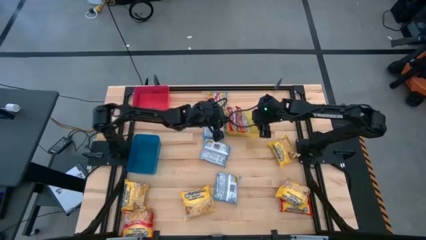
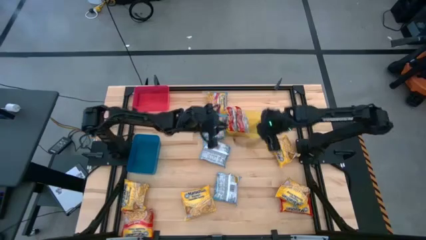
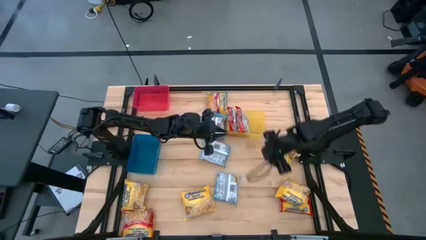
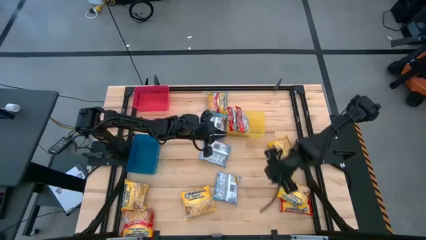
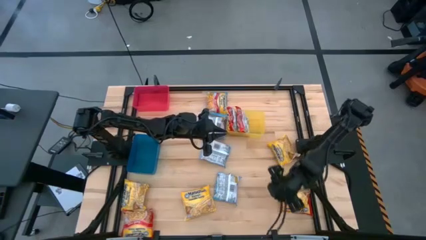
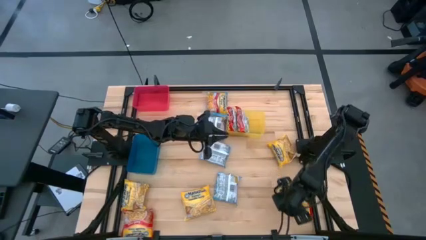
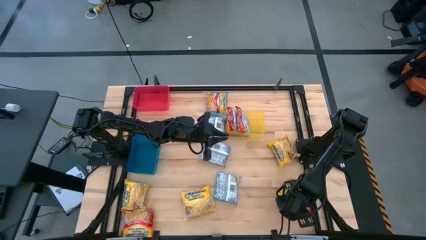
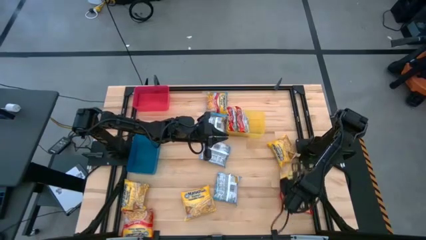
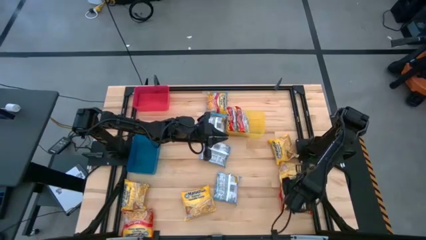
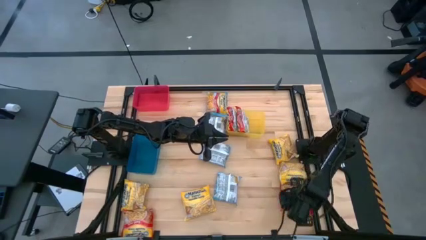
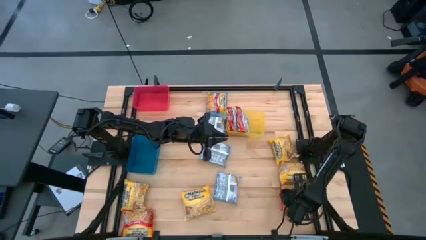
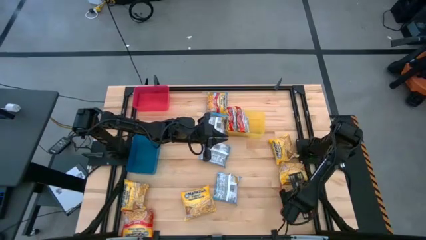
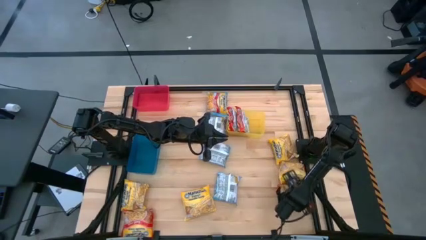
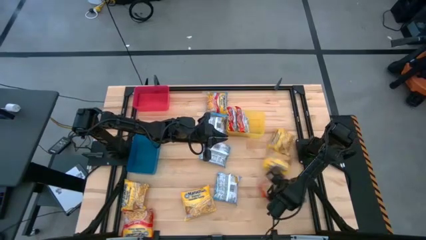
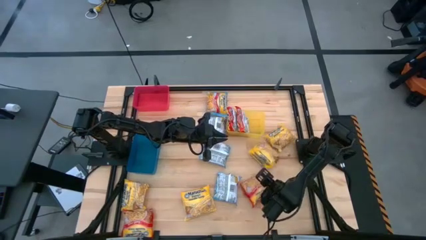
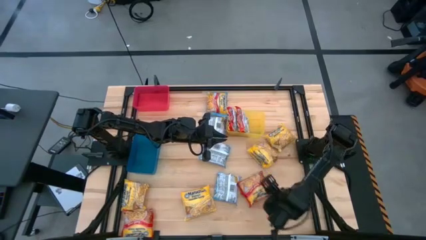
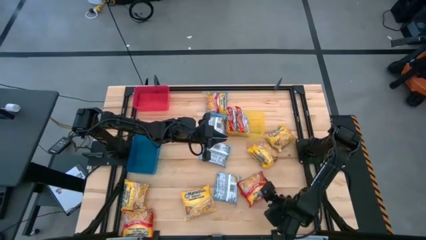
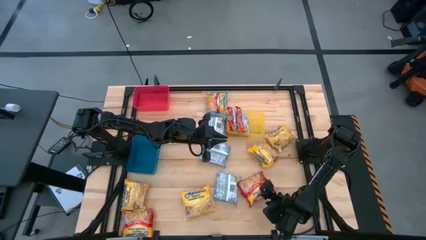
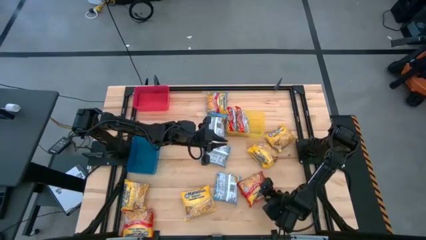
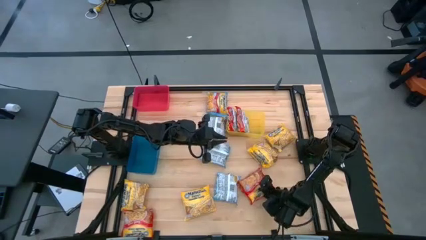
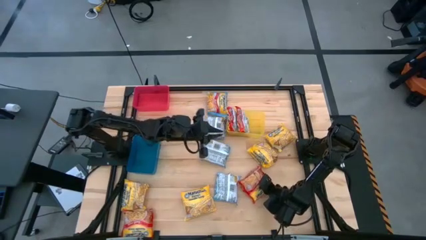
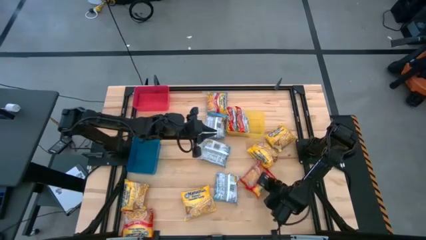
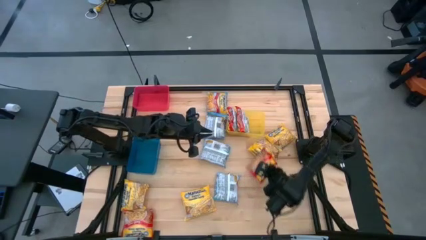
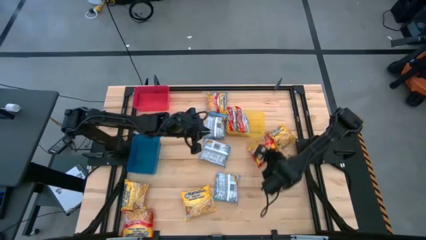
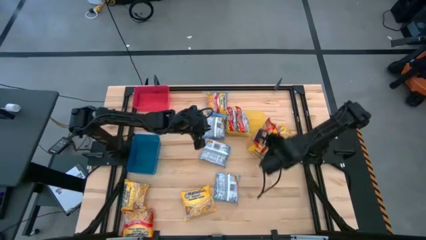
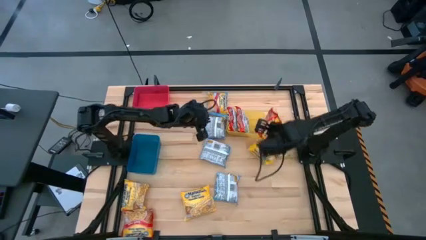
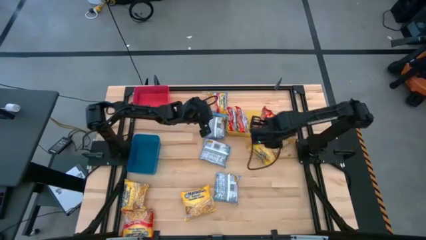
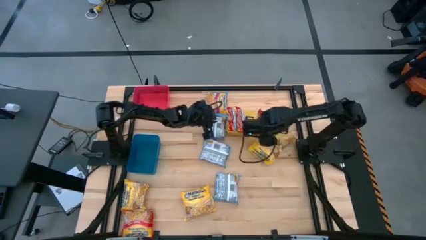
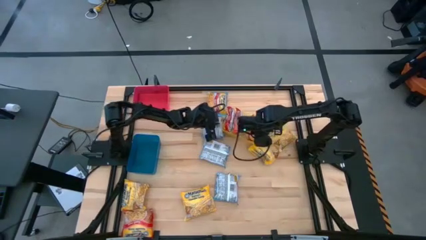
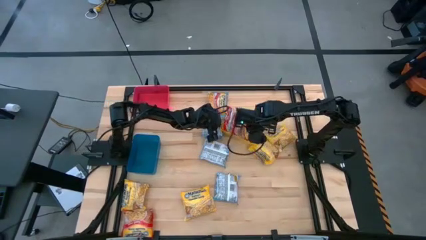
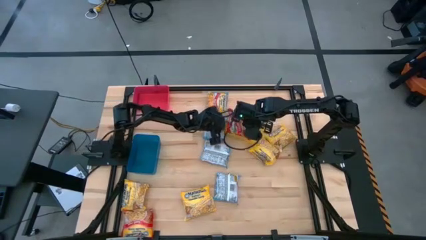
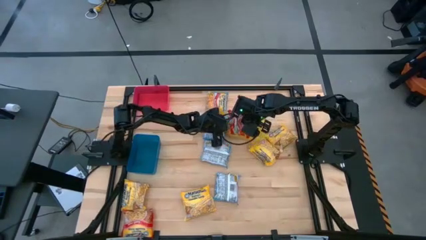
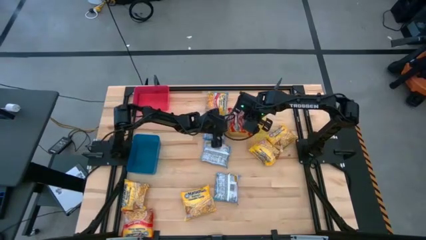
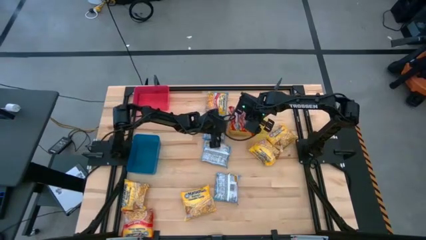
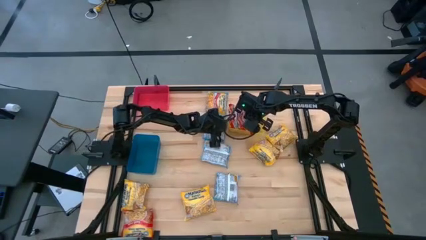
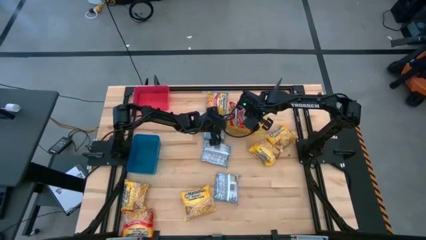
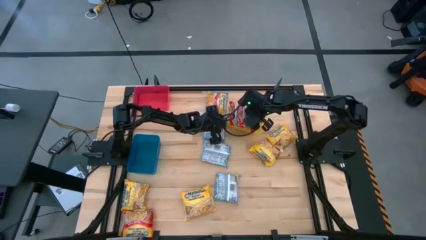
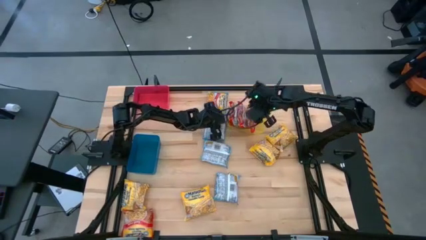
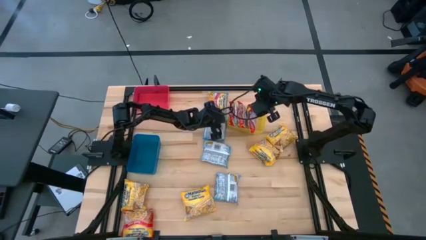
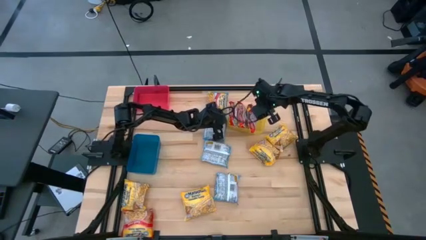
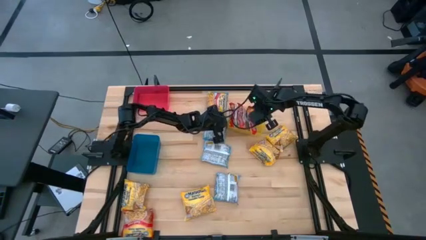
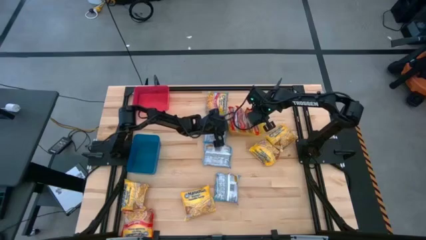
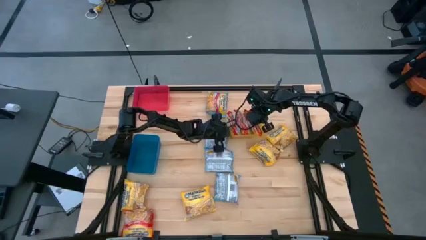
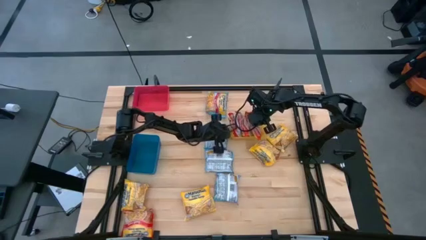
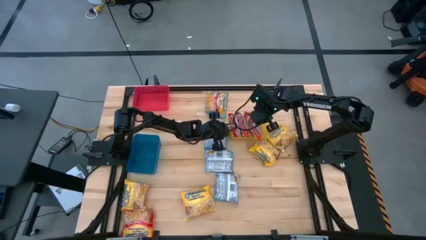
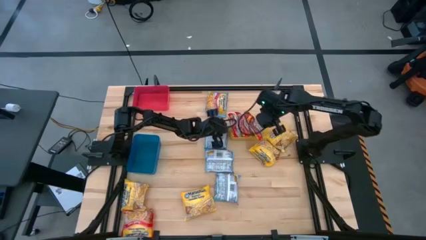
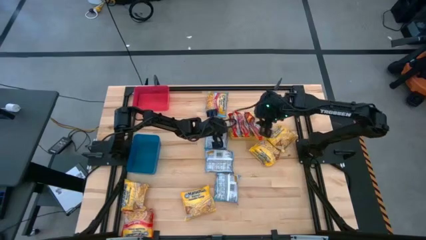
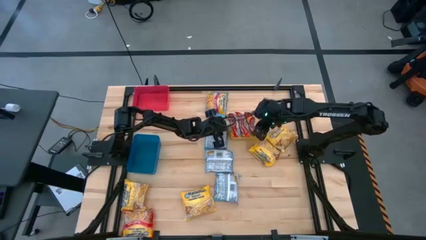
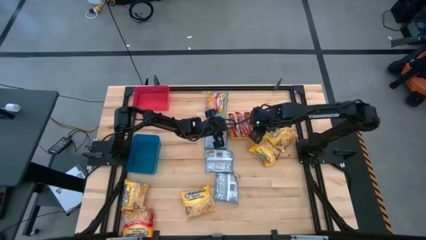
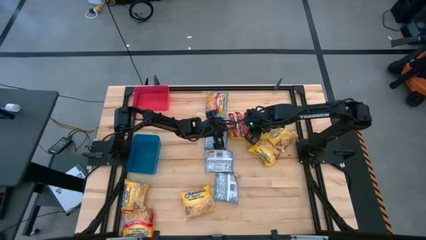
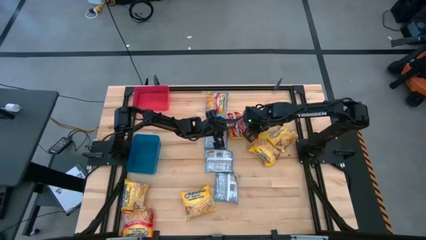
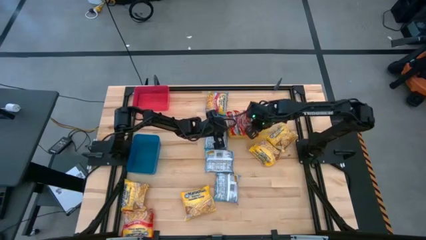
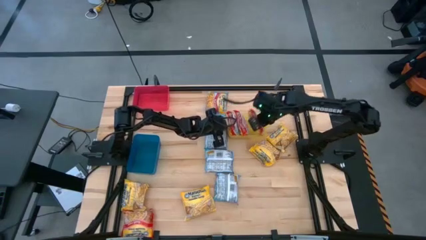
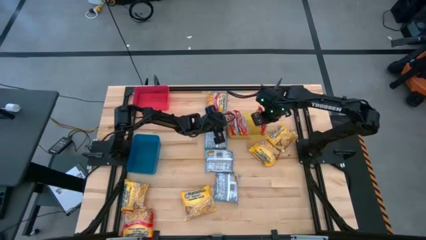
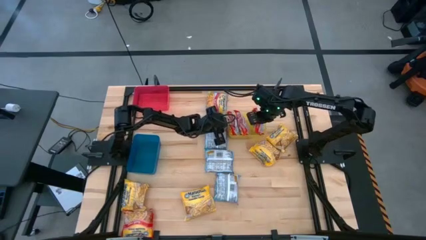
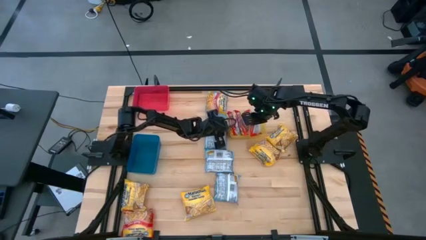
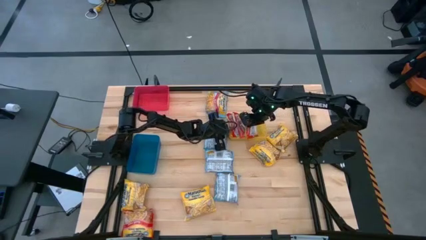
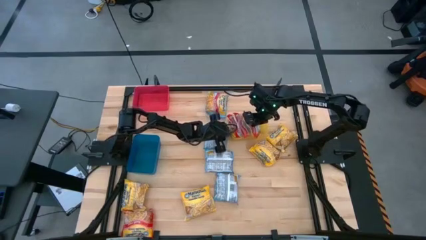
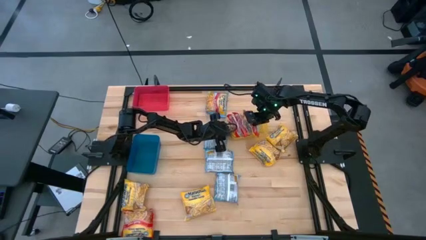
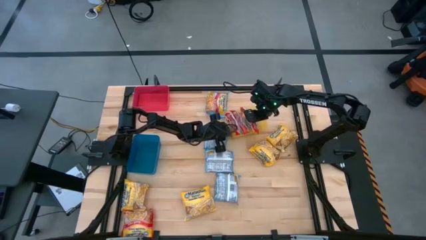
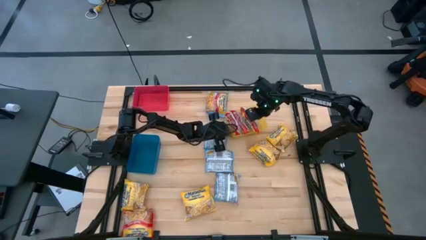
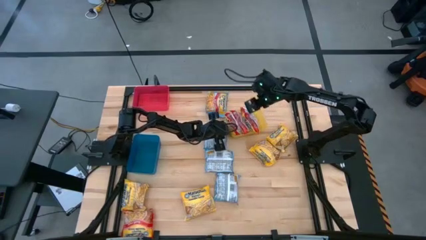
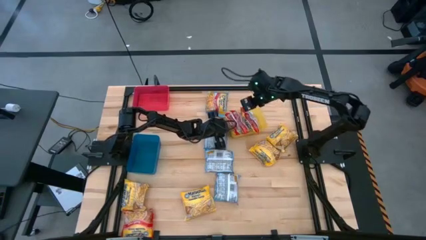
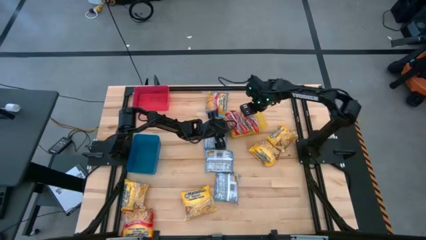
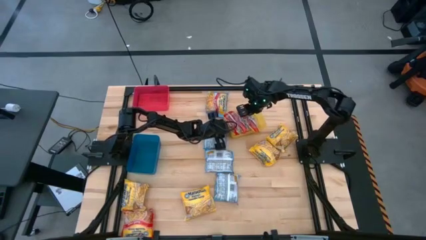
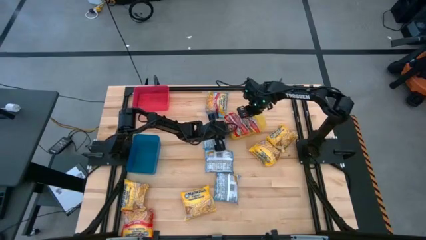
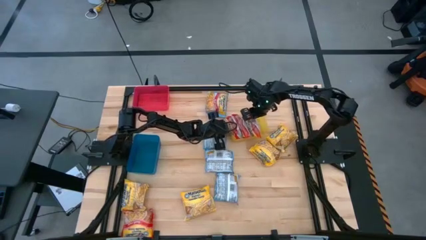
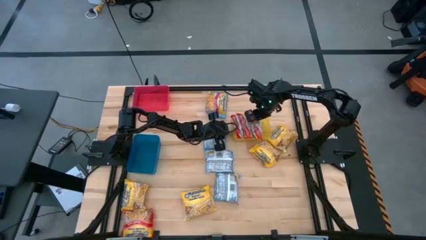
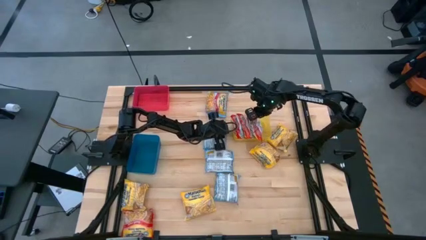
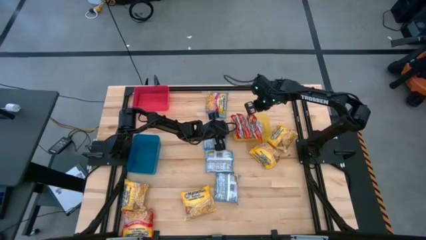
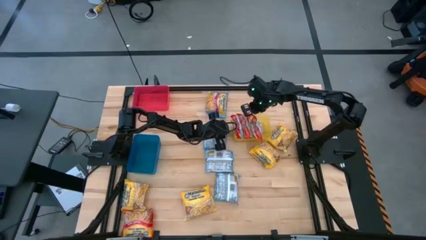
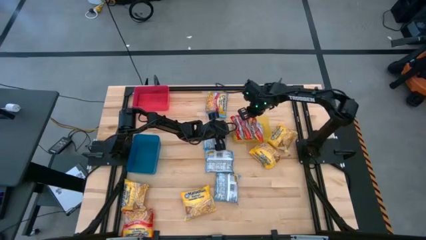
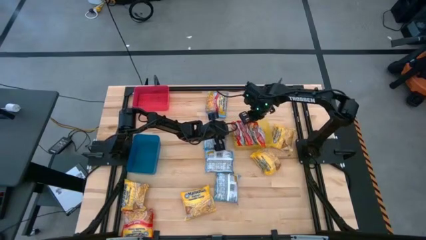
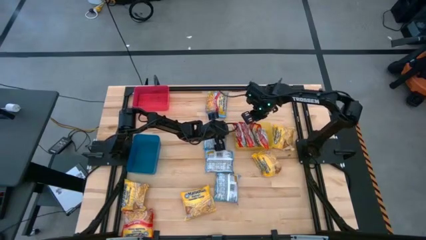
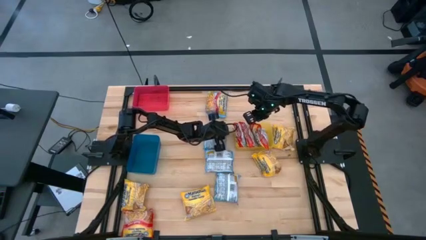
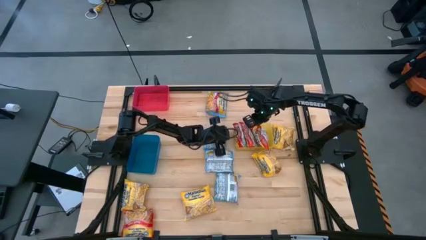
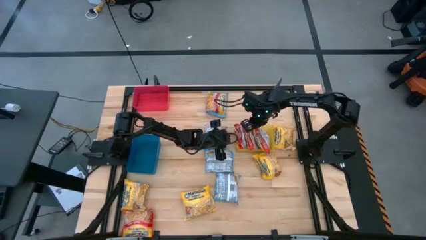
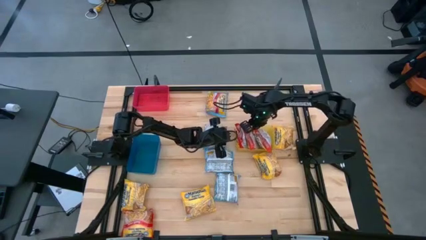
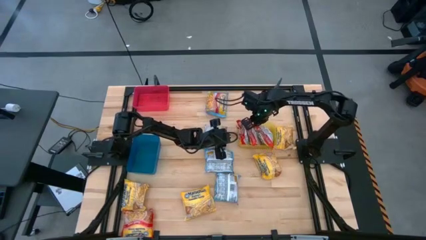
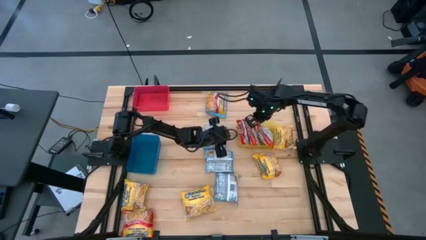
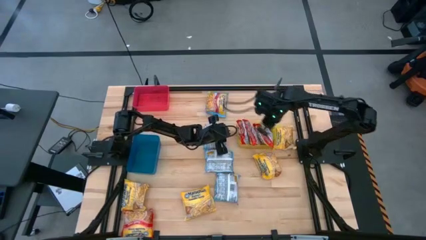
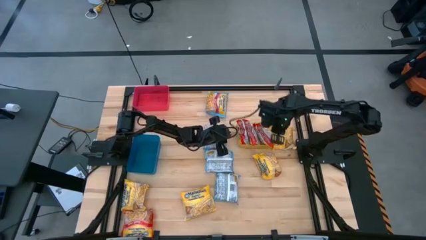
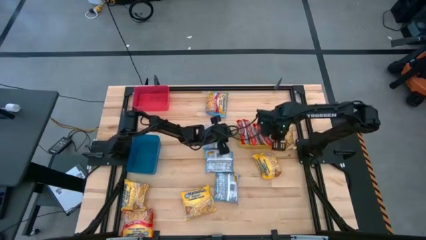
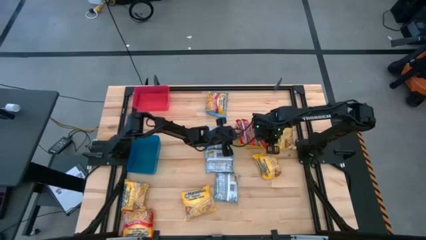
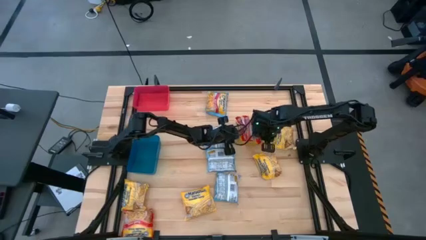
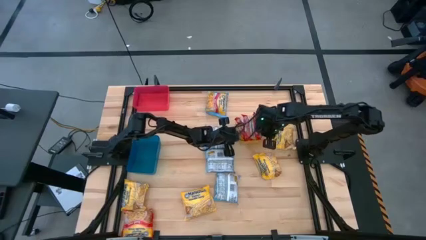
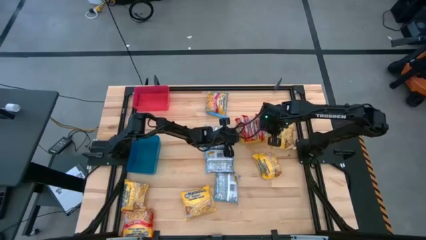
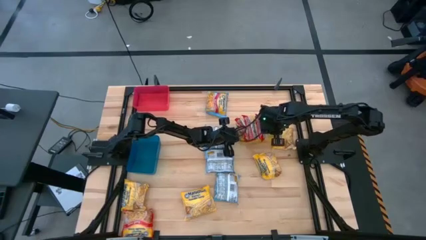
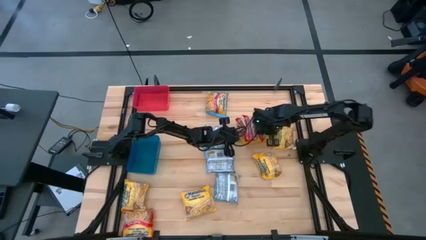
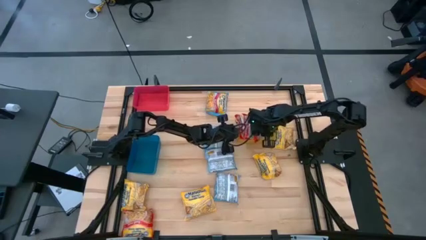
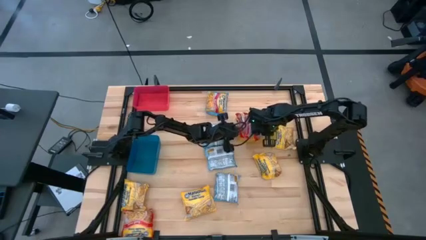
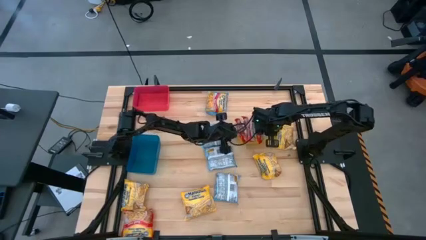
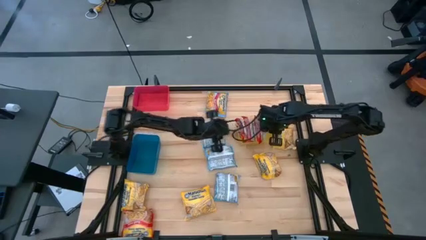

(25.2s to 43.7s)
Task: Sort Maruchan noodles
Put the red noodle pack into the yellow bin
